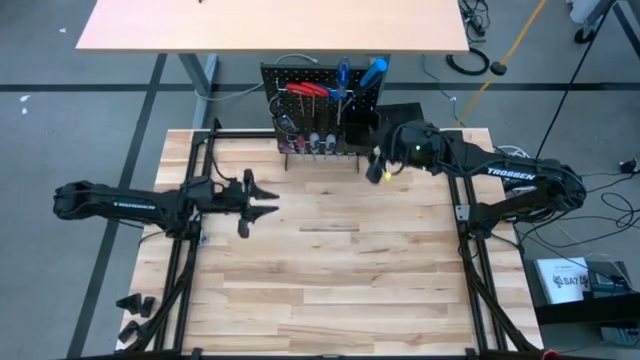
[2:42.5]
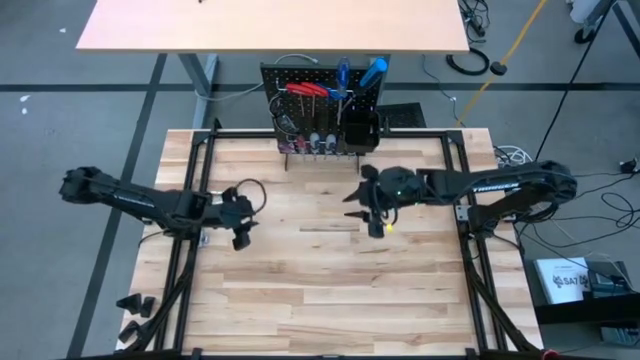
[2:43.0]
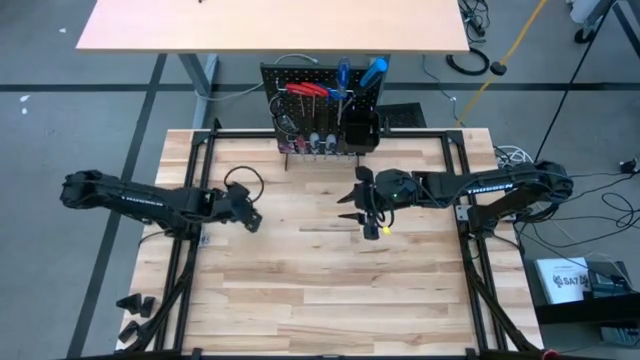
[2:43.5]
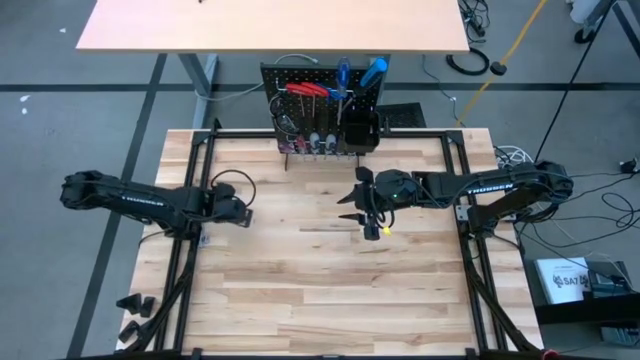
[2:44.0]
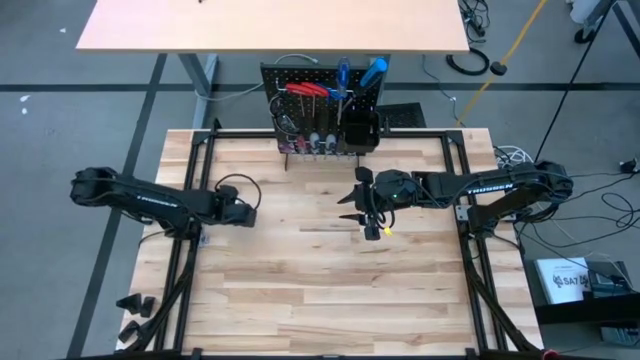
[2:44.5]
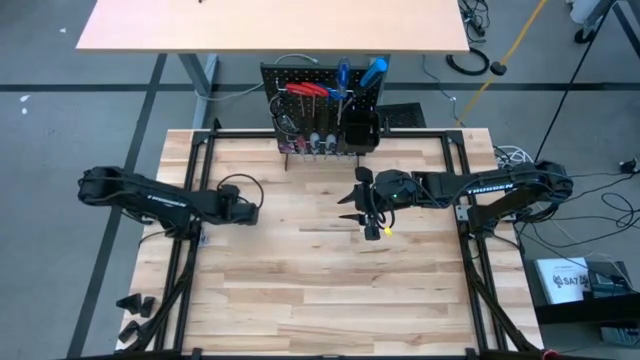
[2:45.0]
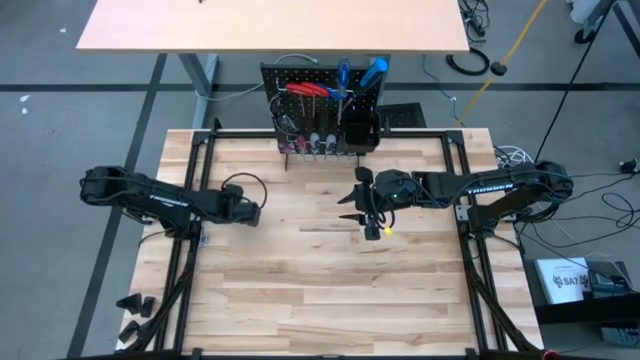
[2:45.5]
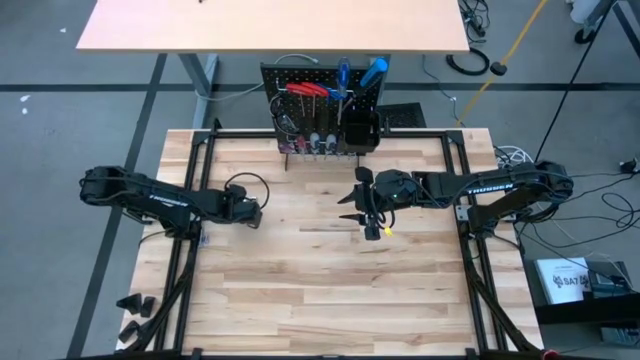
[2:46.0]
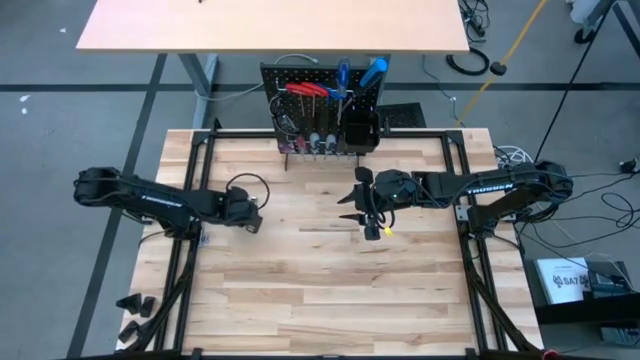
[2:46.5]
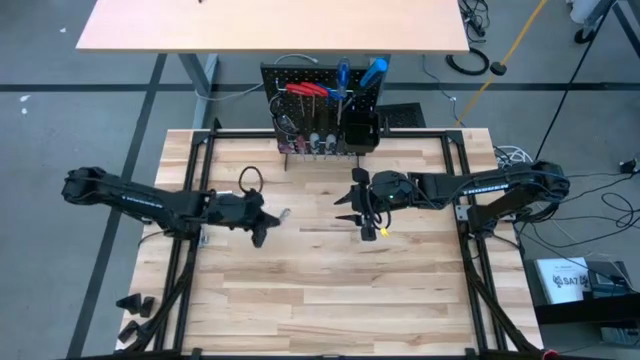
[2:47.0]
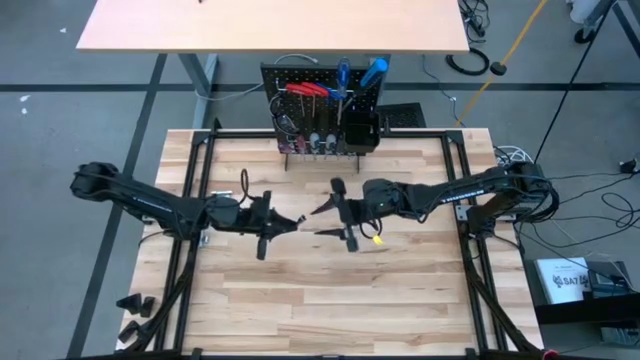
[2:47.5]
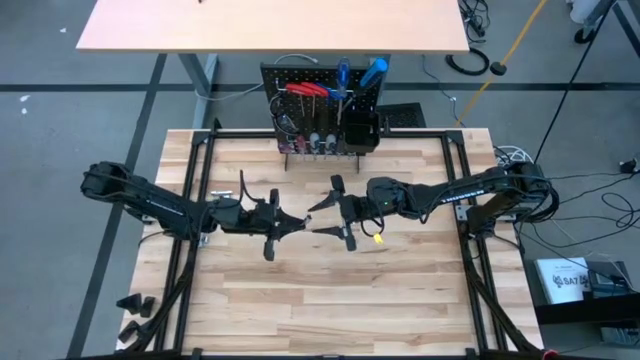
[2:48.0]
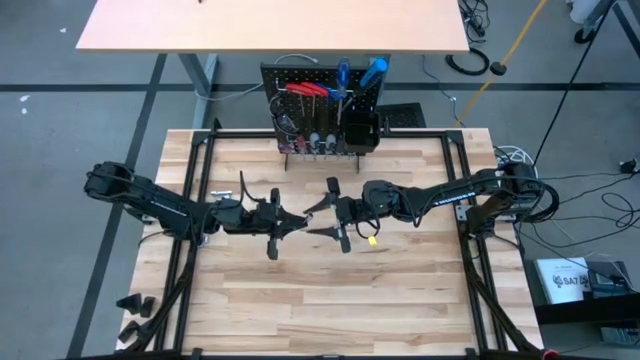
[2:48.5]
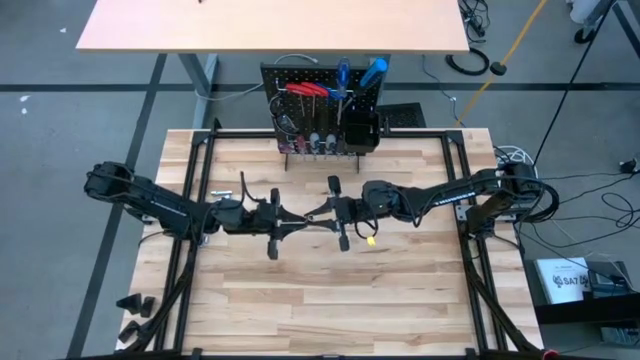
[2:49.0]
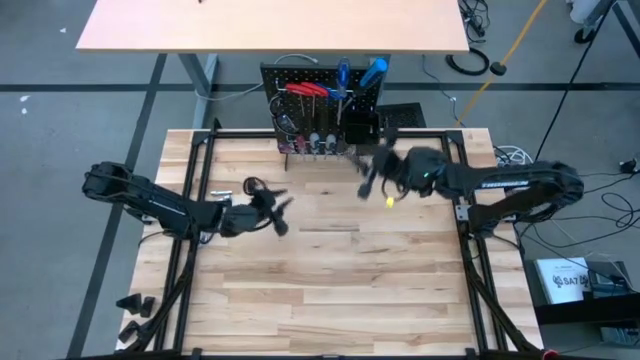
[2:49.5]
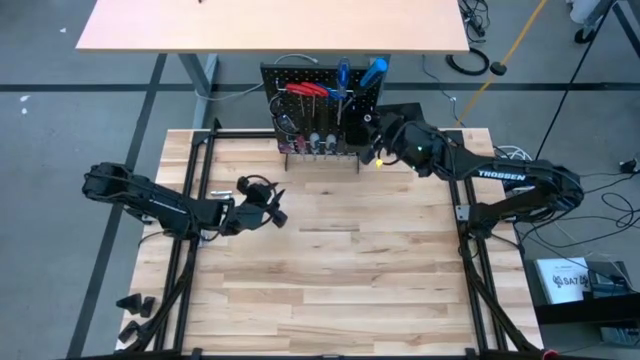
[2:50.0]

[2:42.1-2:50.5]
Task: Hang tools onto peg board
Put the extension bar into the black bin on the peg board

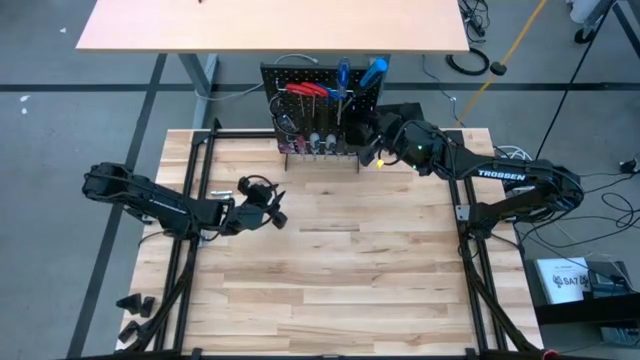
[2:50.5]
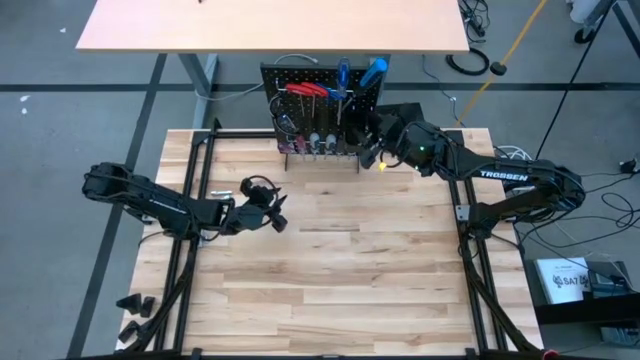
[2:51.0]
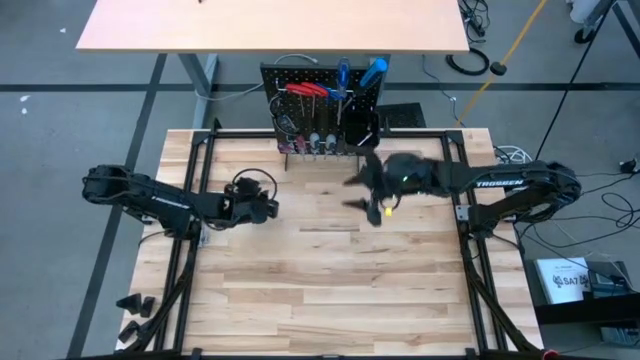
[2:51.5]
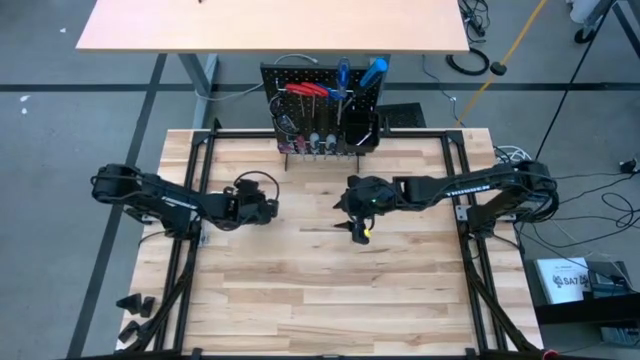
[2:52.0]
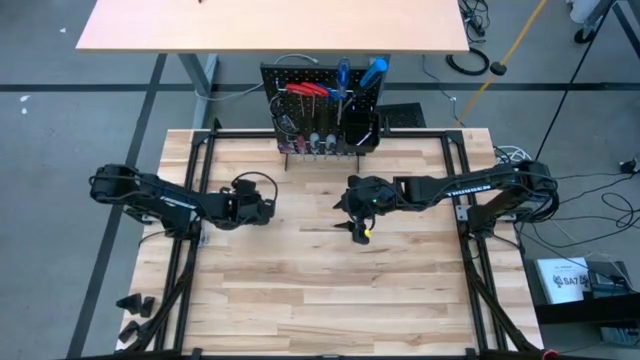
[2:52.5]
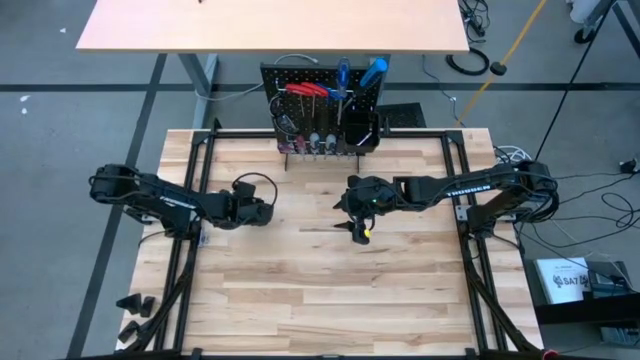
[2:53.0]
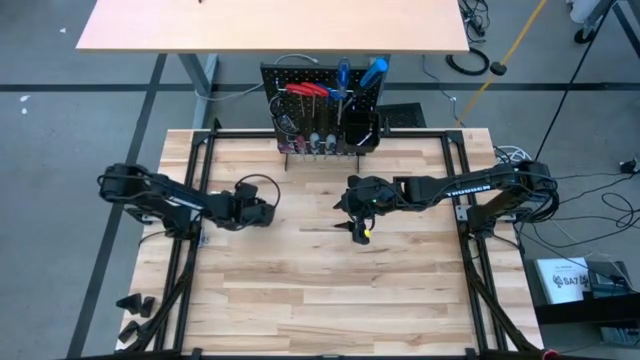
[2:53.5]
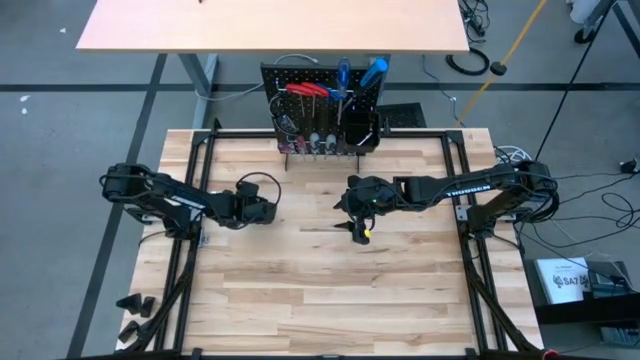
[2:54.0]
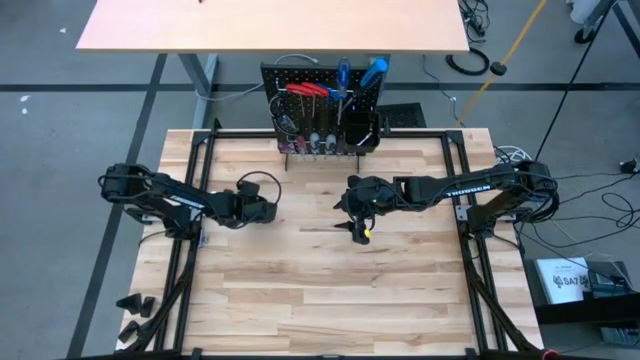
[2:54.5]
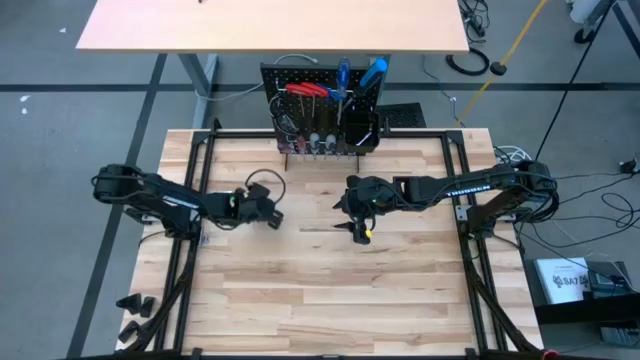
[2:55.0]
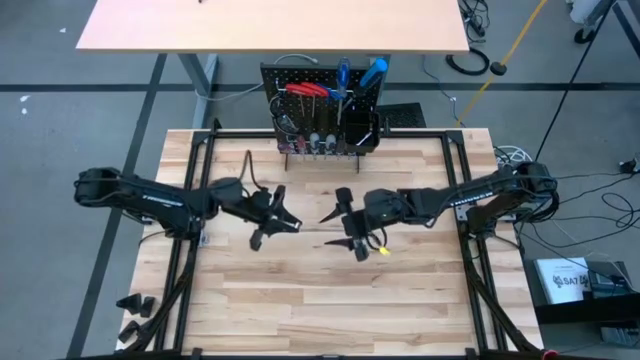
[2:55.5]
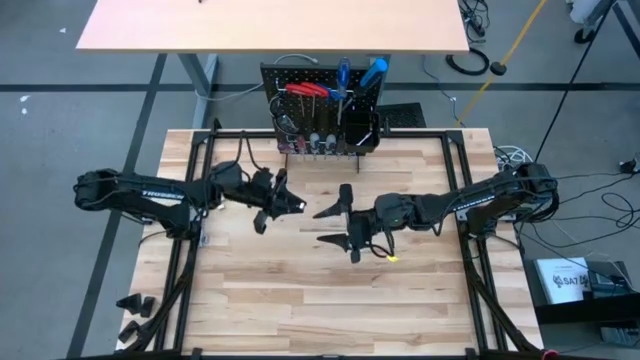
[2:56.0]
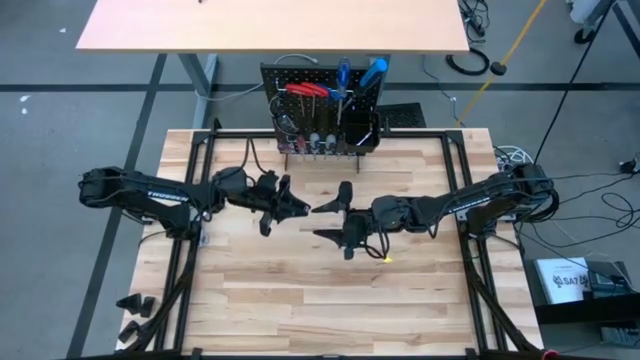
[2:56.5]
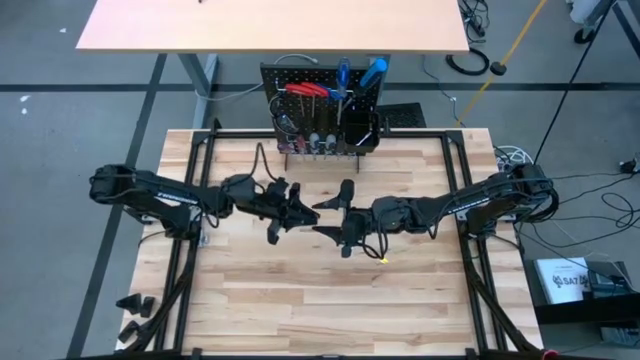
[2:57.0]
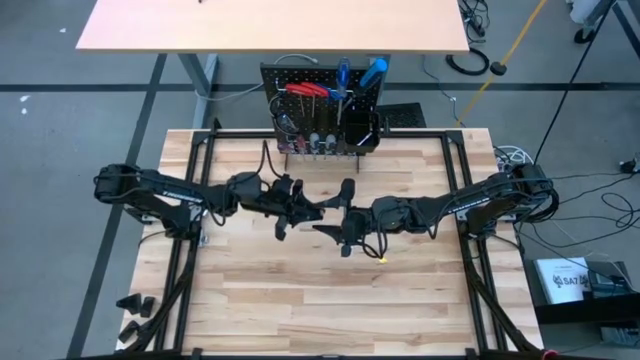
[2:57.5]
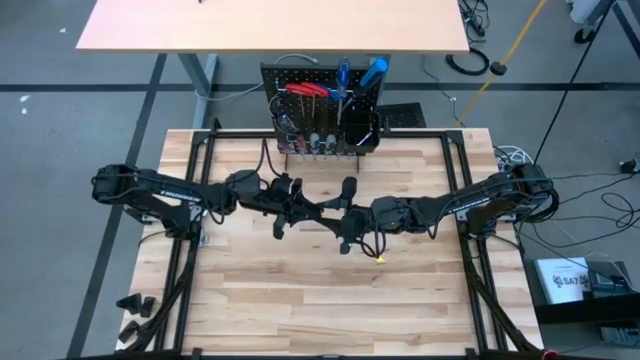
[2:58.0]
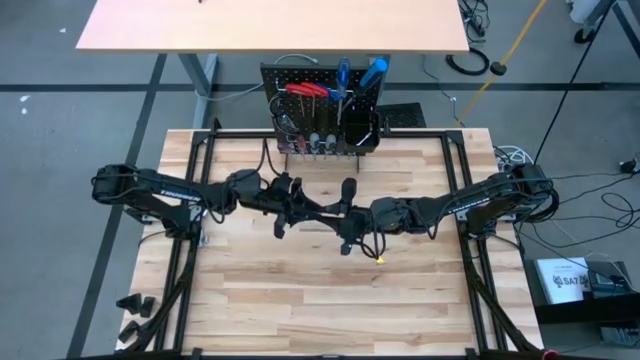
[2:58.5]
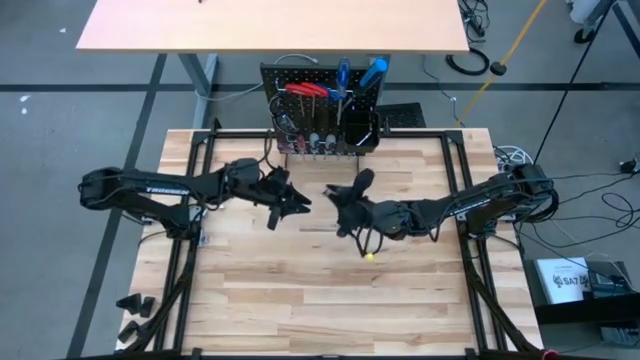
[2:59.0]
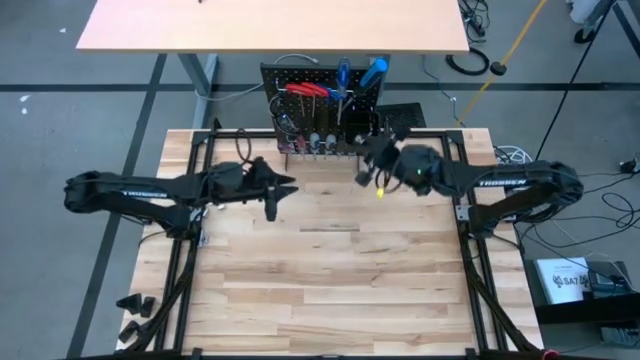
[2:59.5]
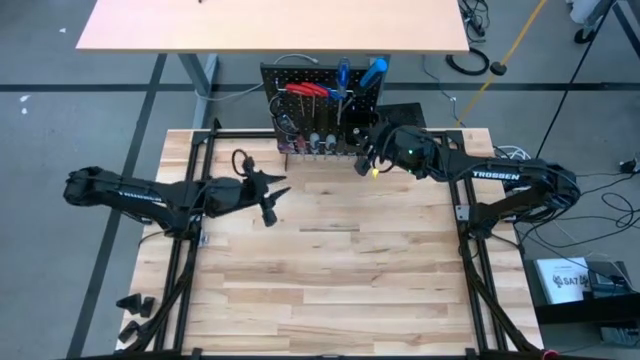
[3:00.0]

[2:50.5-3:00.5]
Put the socket wrench into the black bin on the peg board

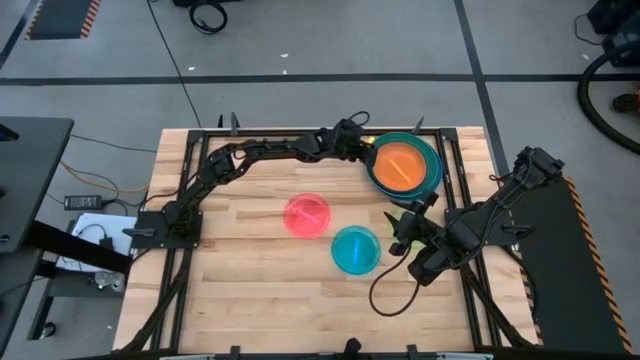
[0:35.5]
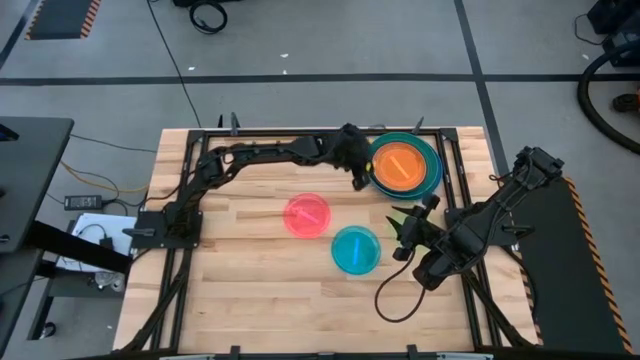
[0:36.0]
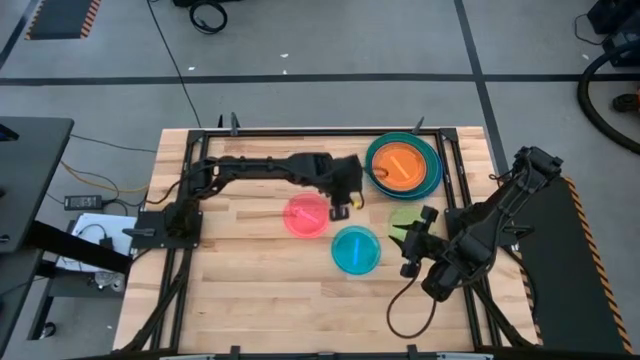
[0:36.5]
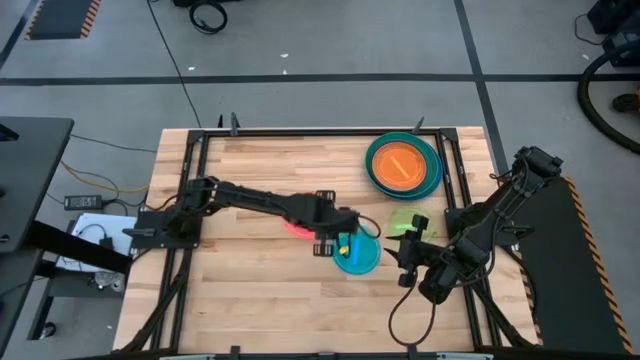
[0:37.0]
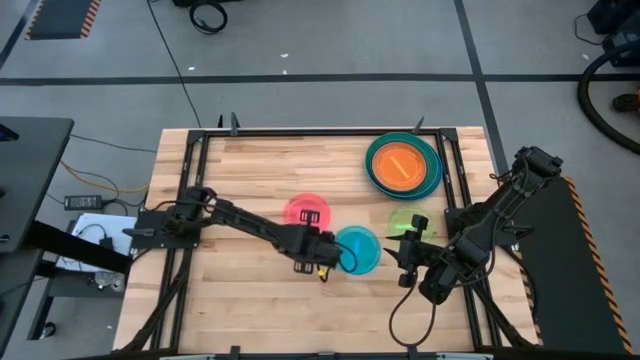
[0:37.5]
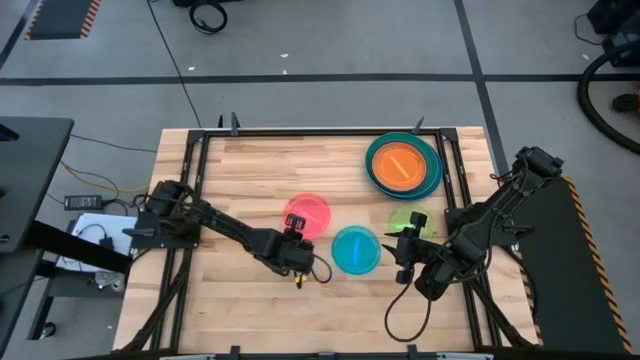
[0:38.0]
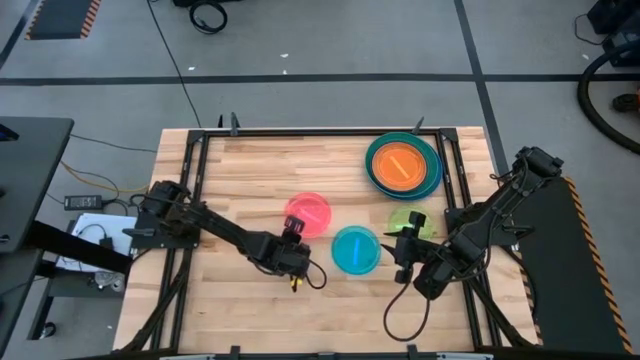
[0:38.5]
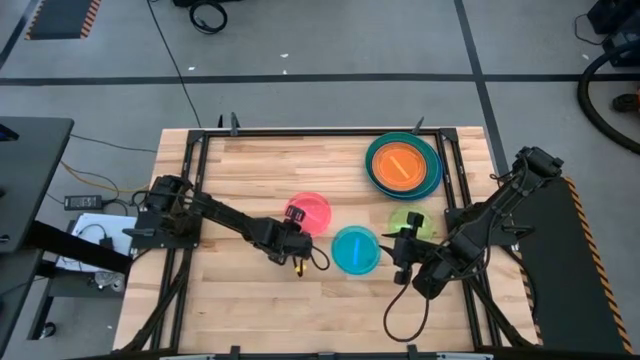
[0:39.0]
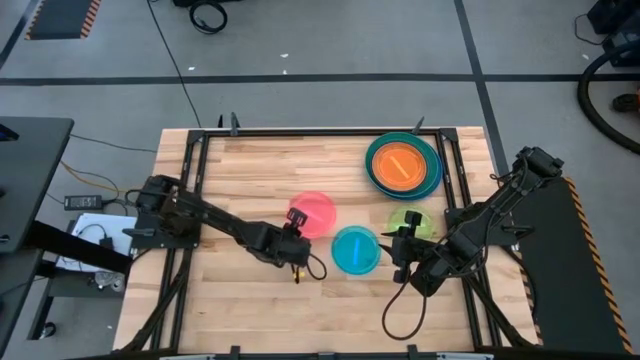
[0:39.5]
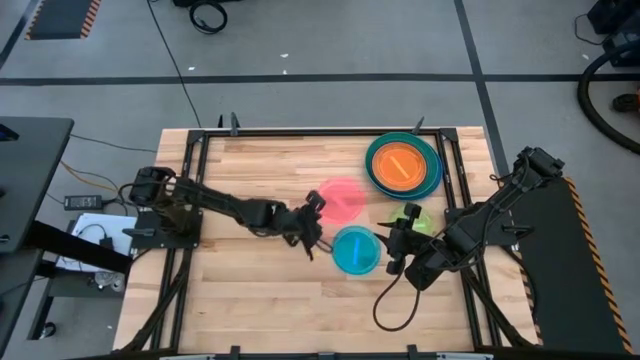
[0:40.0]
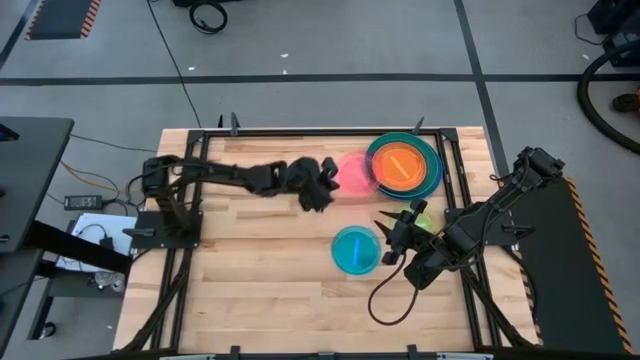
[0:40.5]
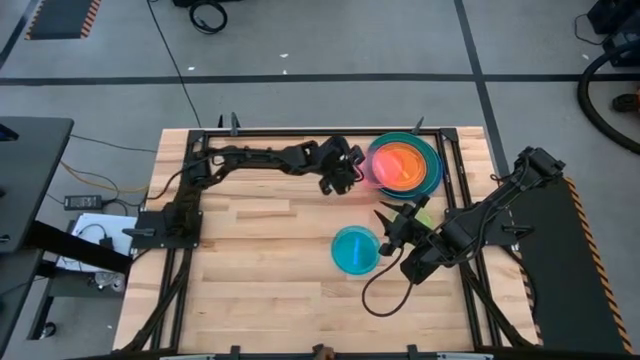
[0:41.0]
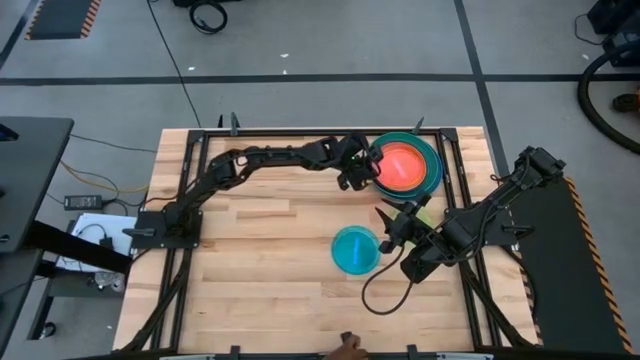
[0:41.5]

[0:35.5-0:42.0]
Task: Stack plastic plates
Stack the pink plate on top of the orange plate
